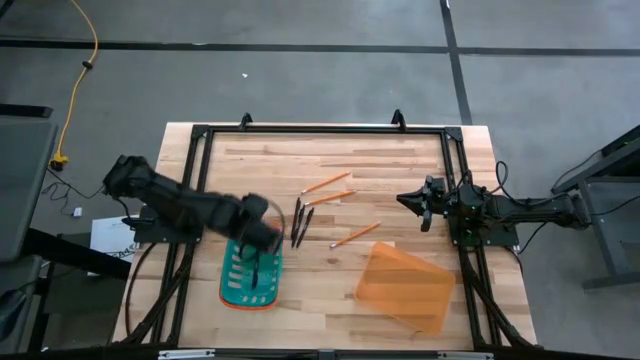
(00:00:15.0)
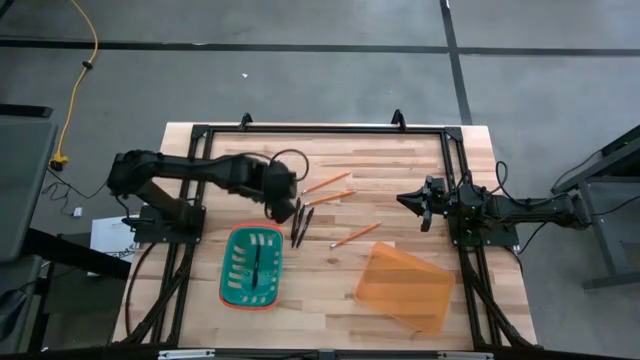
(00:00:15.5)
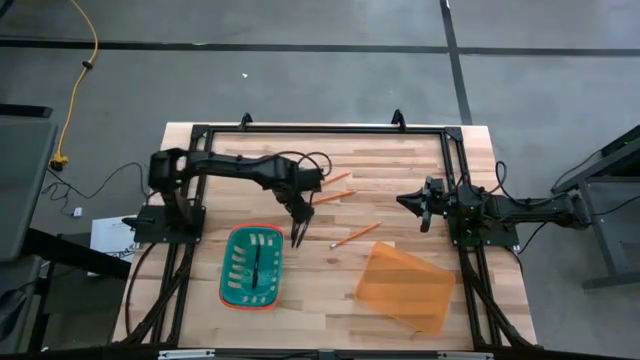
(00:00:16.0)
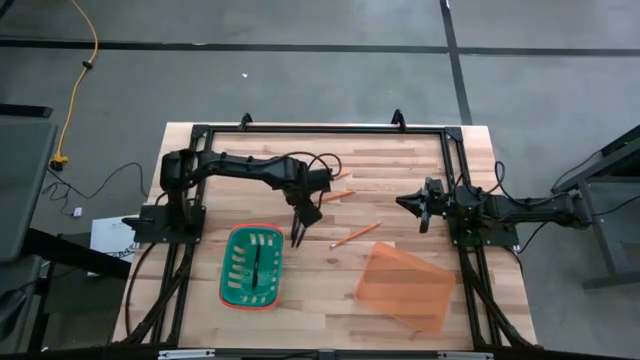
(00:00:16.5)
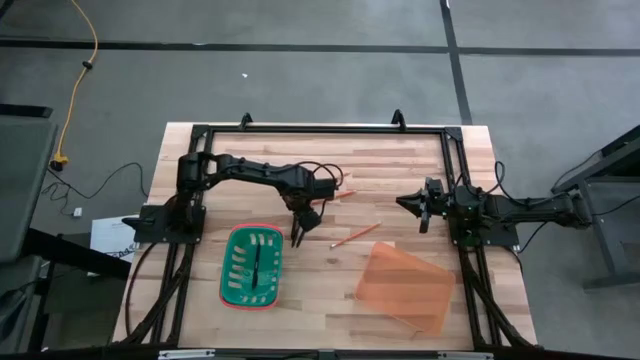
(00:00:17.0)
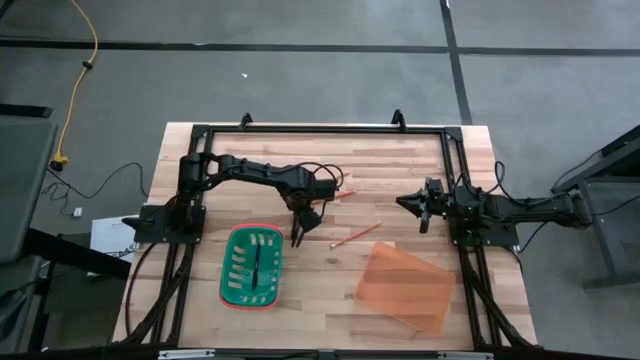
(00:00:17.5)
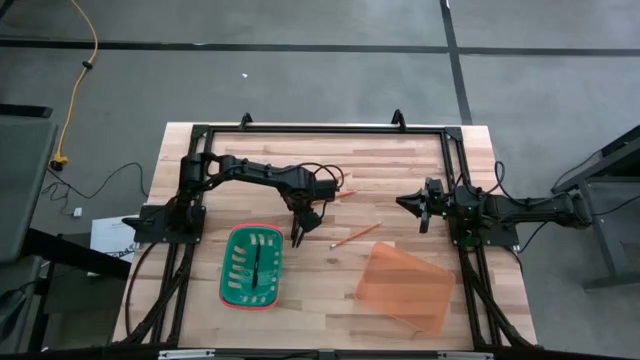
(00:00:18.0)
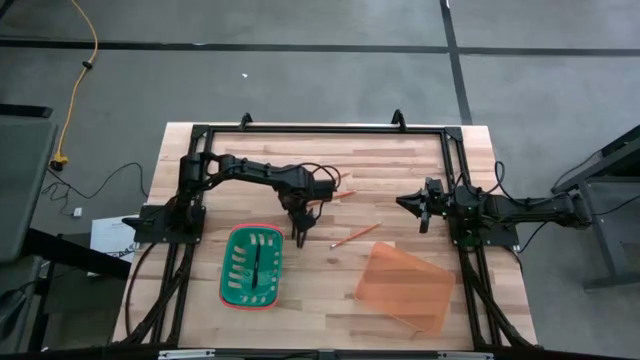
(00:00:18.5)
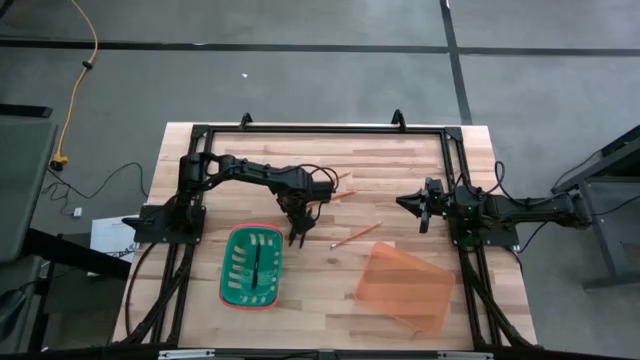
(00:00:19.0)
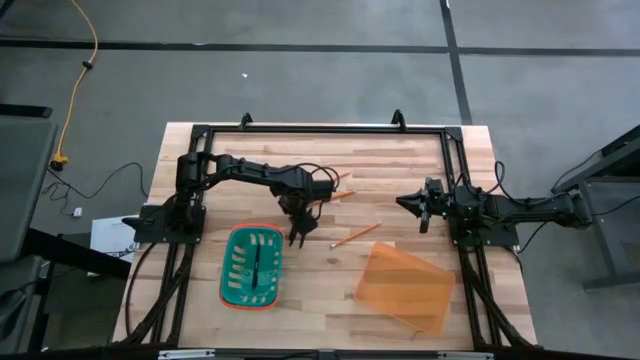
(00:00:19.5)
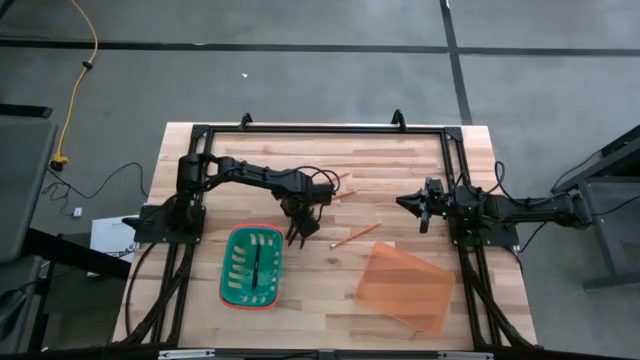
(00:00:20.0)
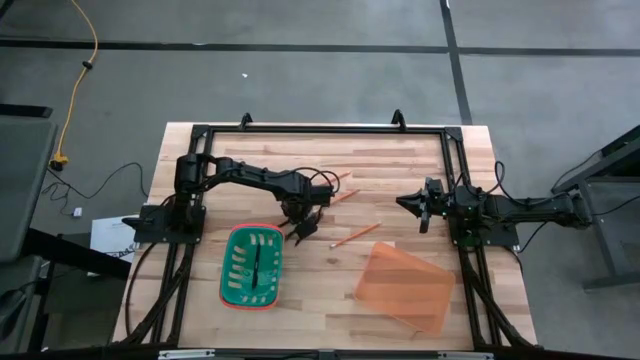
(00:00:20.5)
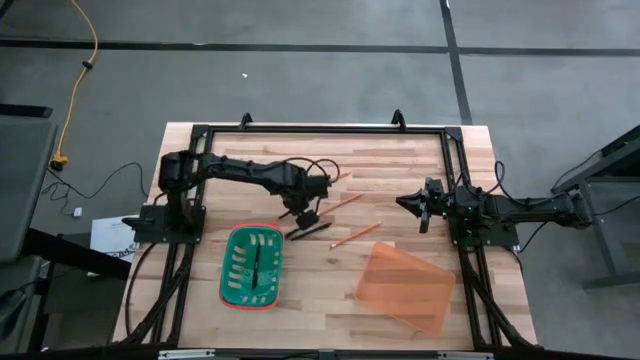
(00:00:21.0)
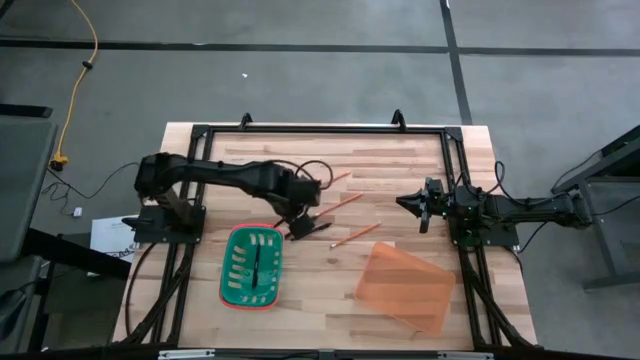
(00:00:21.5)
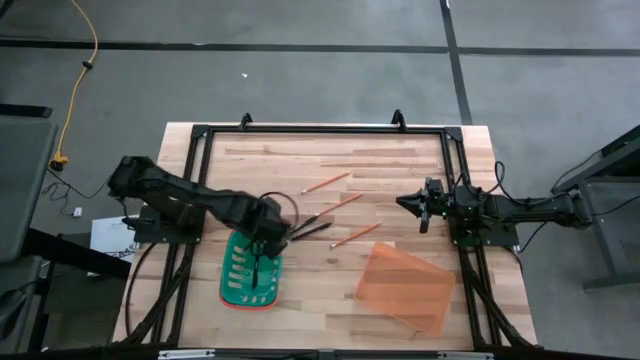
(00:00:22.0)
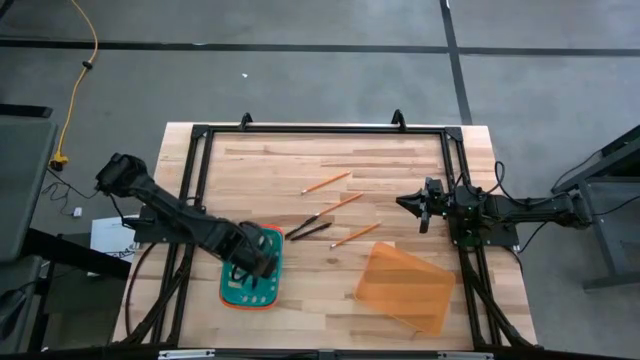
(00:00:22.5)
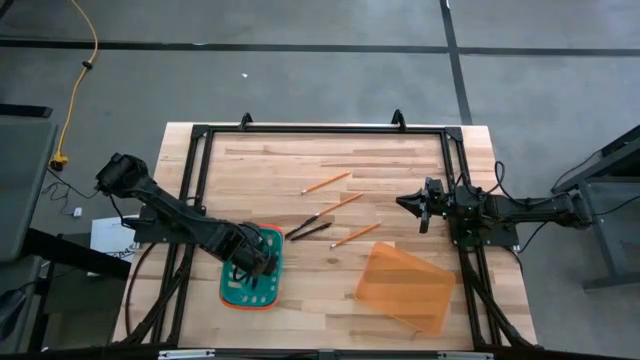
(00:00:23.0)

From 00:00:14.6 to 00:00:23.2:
Task: Sort pens & pencils
Put the black pen into the green bin

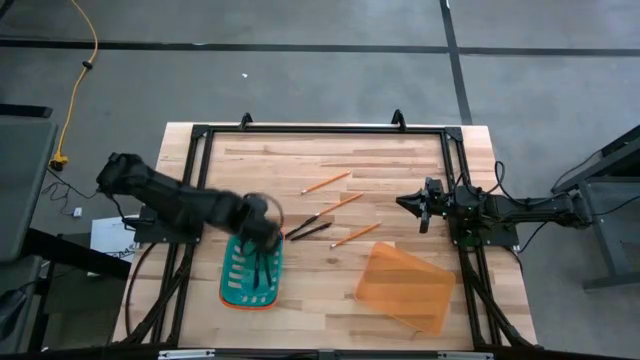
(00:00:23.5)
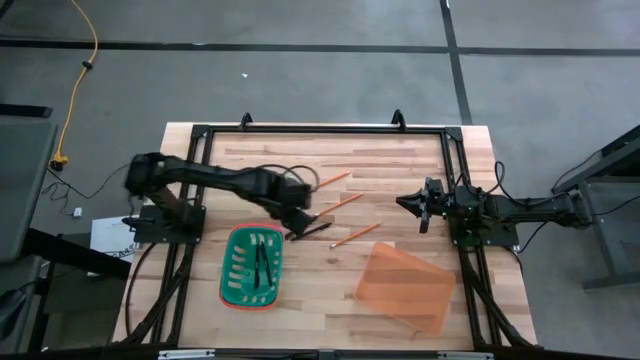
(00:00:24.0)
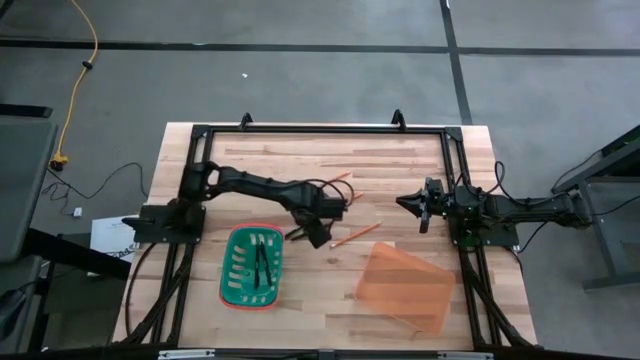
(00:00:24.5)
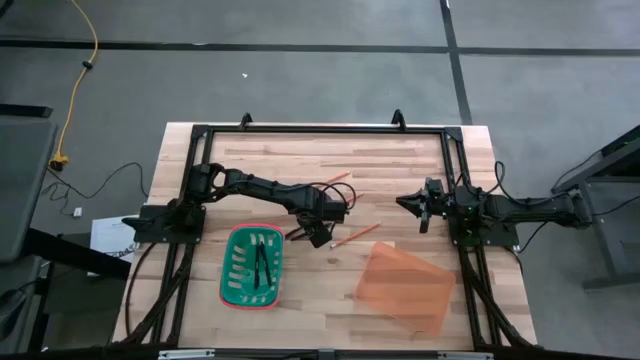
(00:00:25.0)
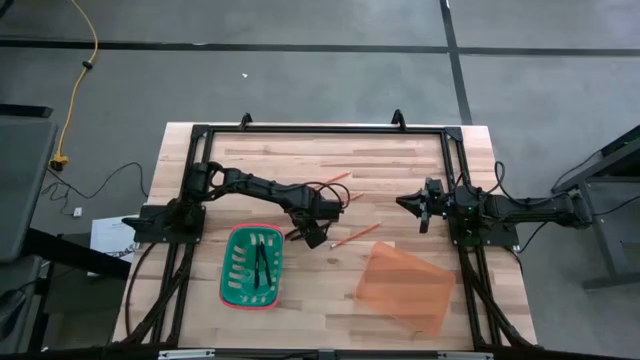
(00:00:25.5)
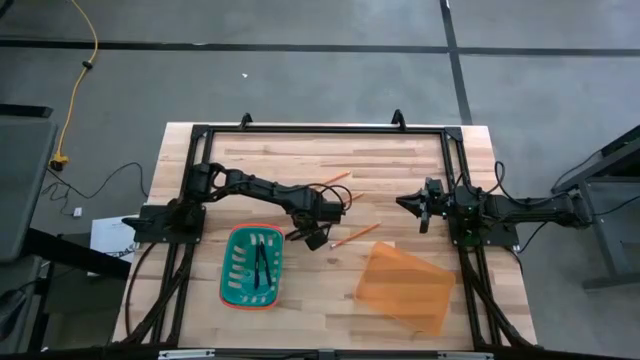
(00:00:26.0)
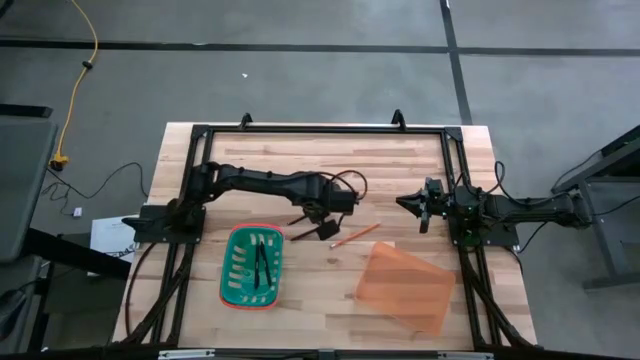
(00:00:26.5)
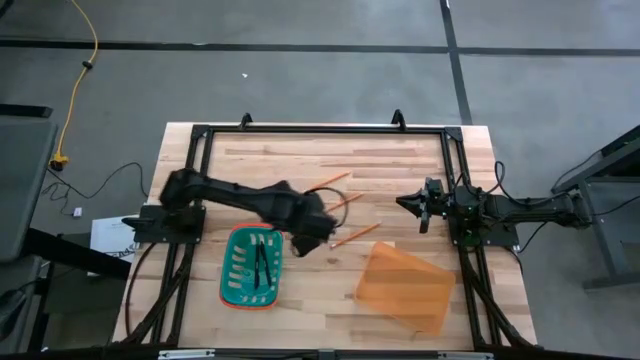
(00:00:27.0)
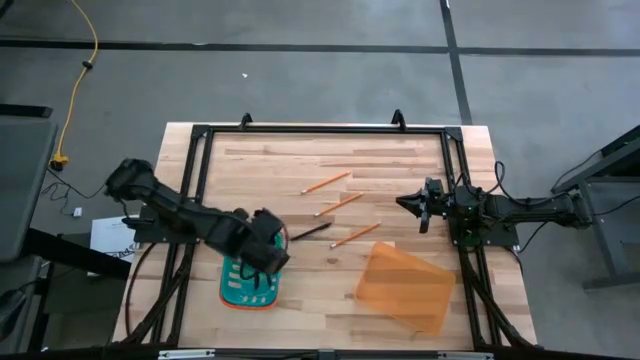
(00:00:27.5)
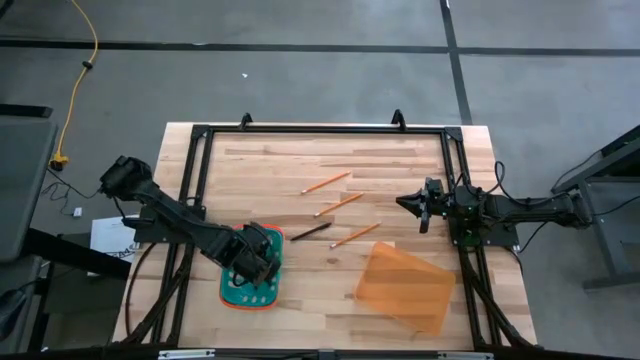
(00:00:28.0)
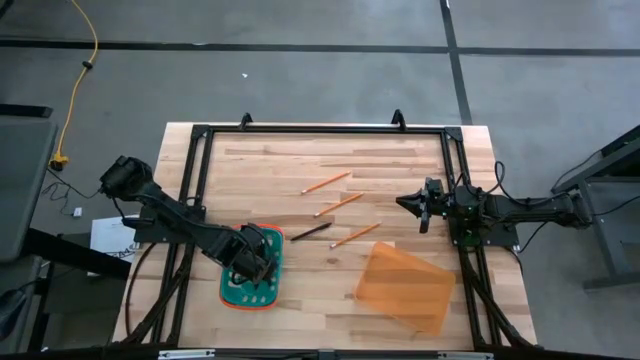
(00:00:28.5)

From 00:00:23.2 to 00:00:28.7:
Put the black pen into the green bin

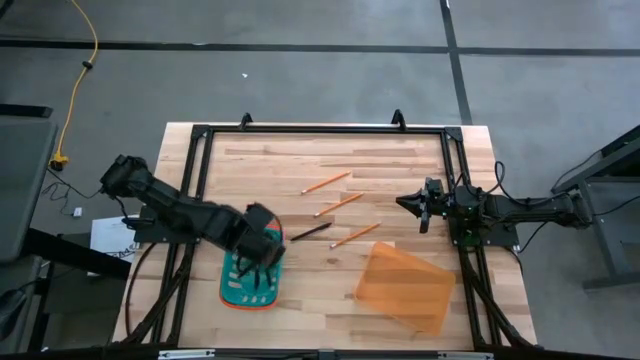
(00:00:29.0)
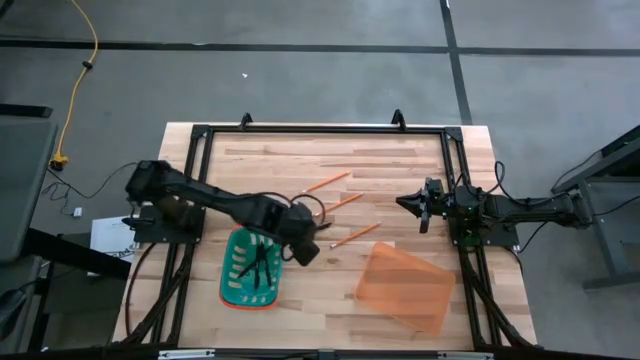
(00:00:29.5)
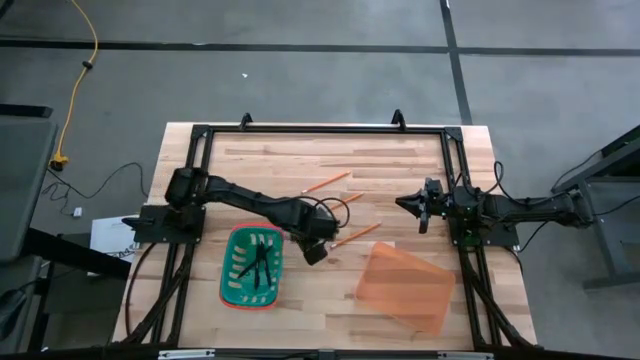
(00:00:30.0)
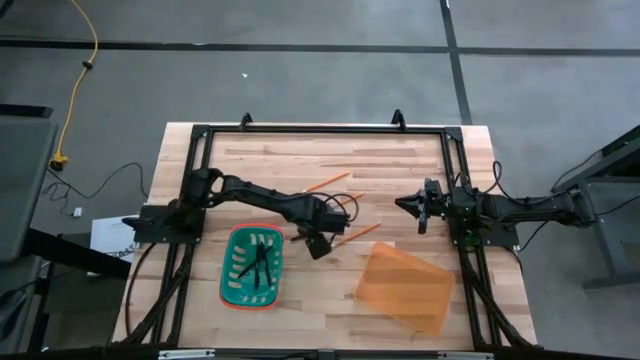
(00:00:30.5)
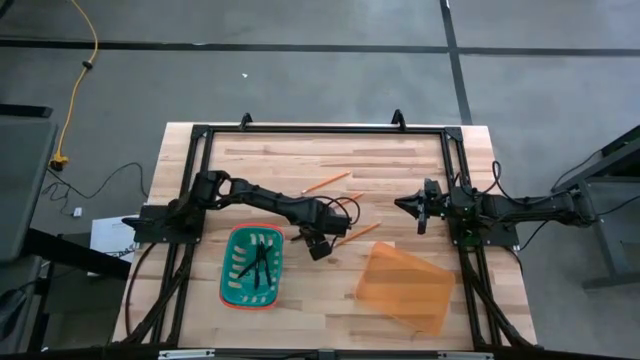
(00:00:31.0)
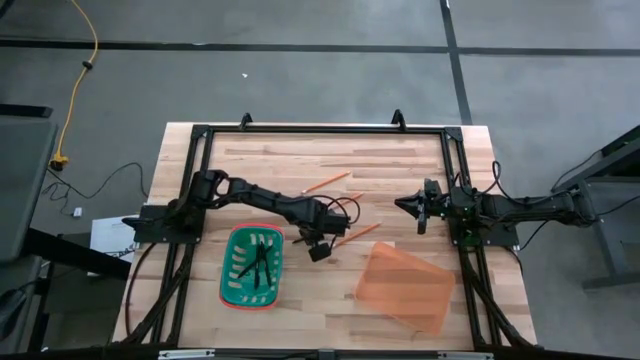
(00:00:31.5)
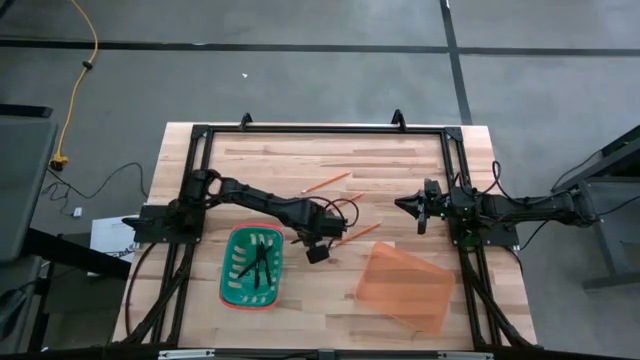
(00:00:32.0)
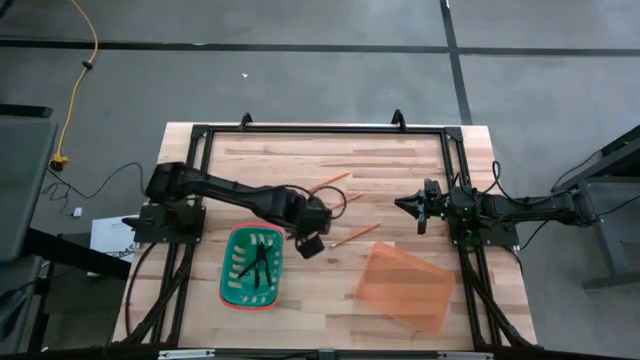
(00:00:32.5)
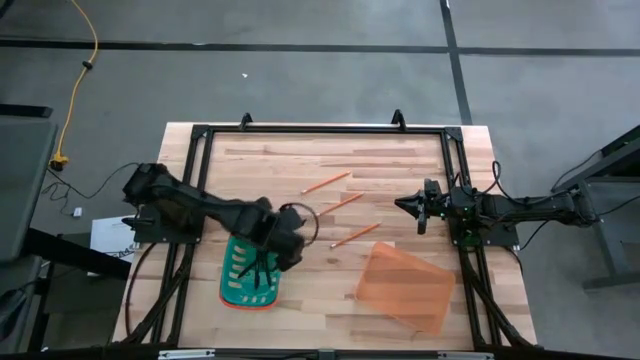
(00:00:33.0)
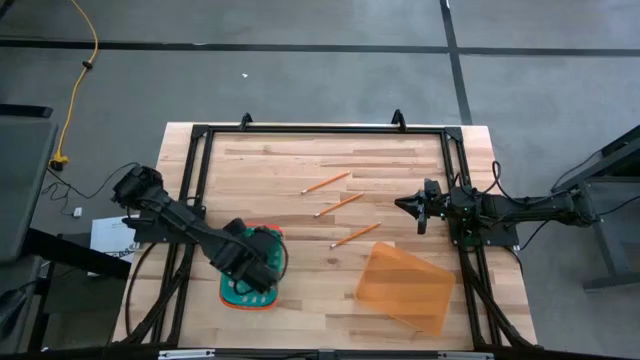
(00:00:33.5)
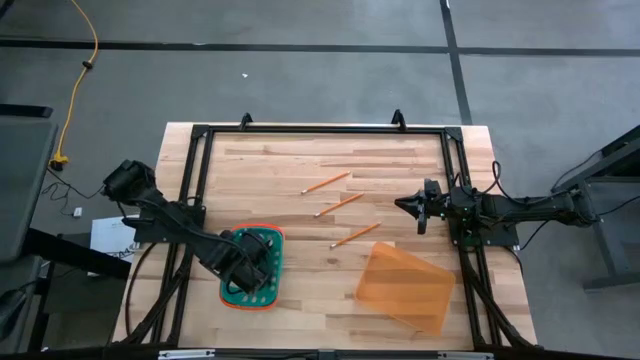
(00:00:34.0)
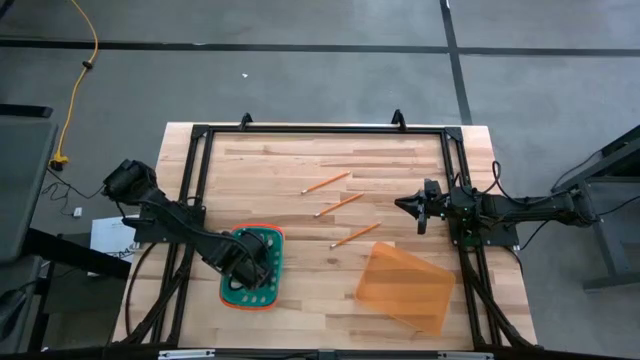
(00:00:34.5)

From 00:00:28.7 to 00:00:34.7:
Put the black pen into the green bin

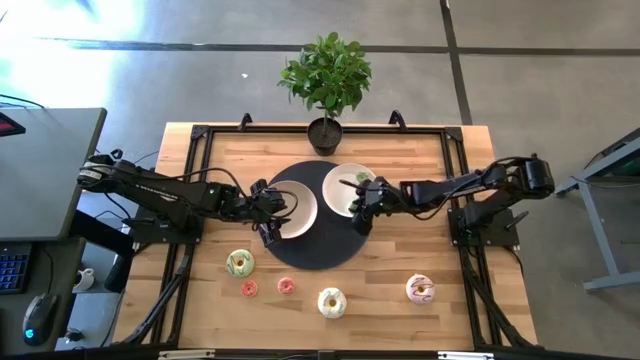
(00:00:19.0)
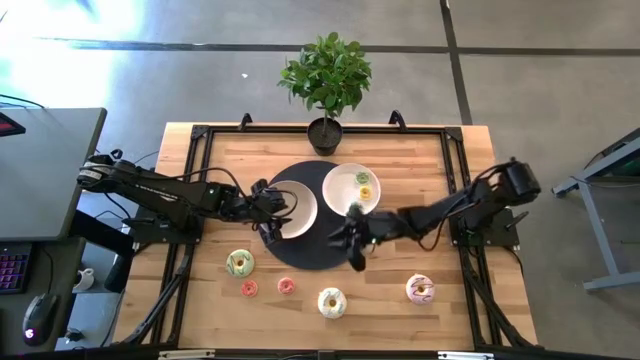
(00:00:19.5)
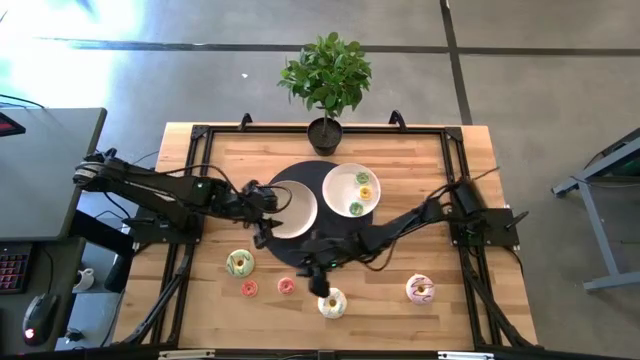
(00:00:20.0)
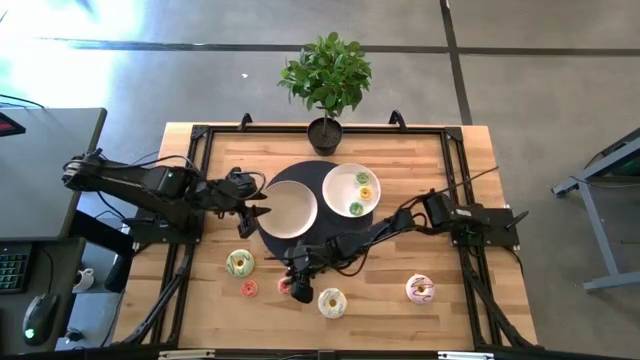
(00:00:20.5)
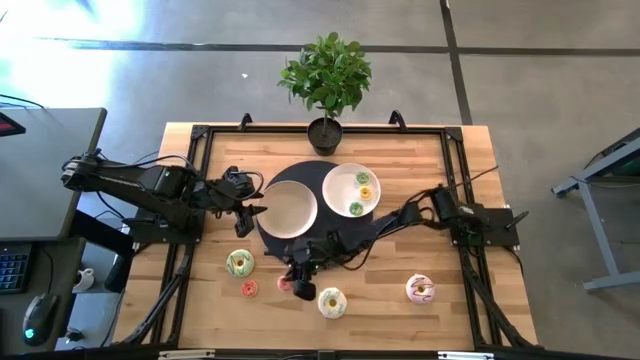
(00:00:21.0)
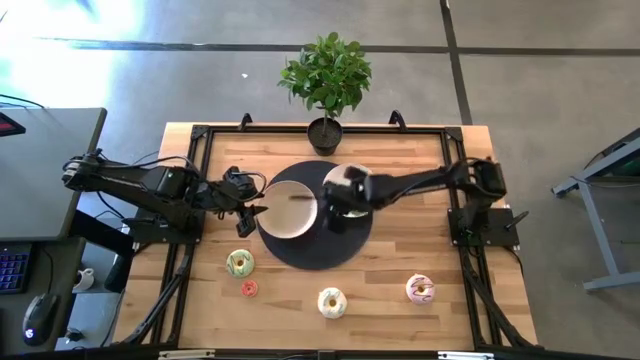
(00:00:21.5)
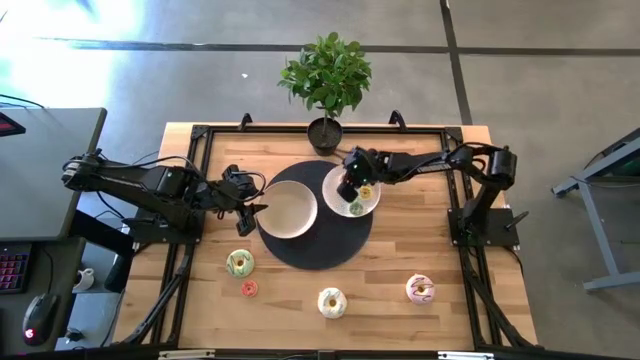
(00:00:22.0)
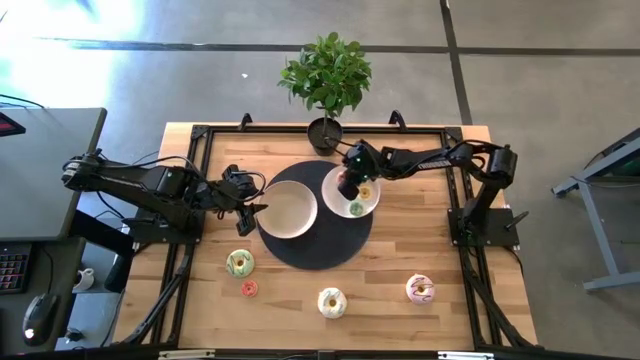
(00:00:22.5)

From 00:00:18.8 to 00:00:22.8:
Task: Pick & Place donuts
Put the small right pink donut on the right white plate
